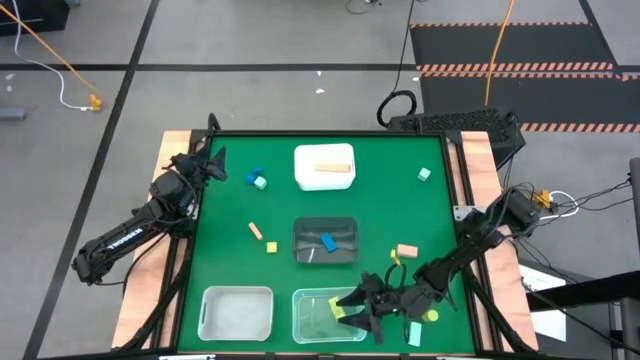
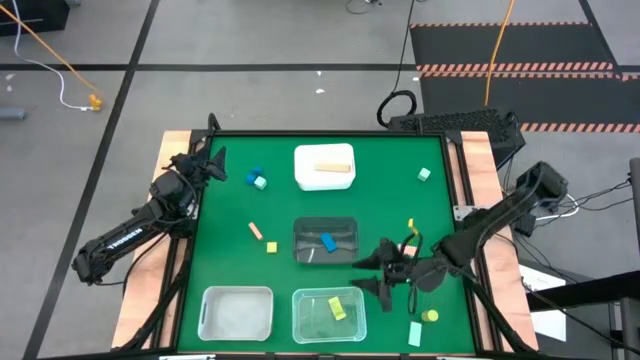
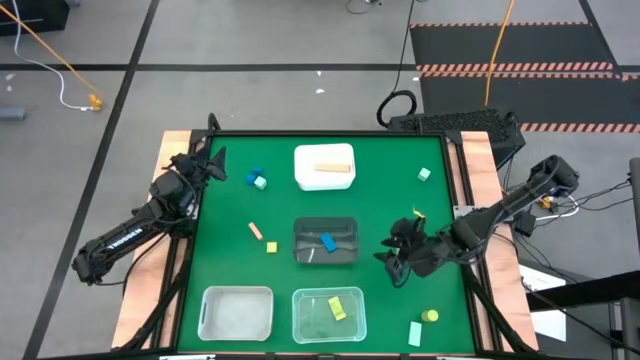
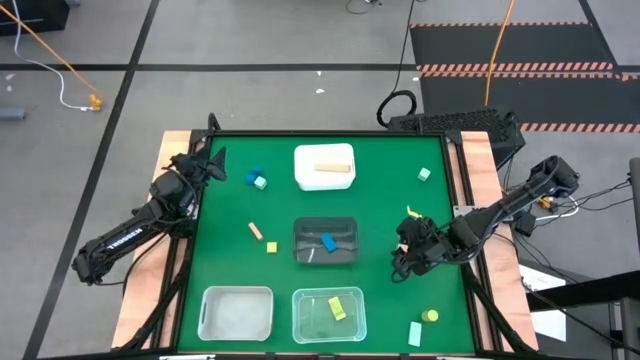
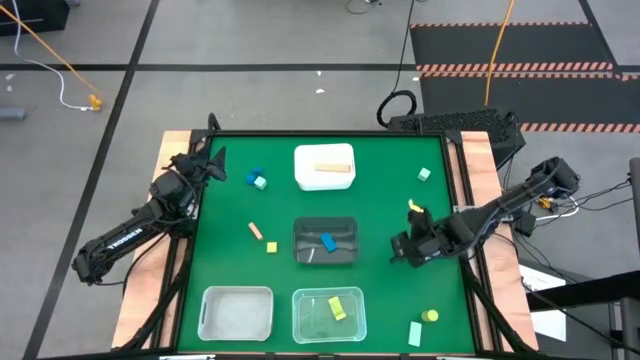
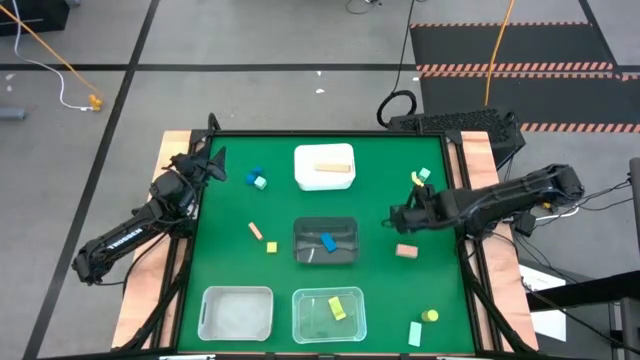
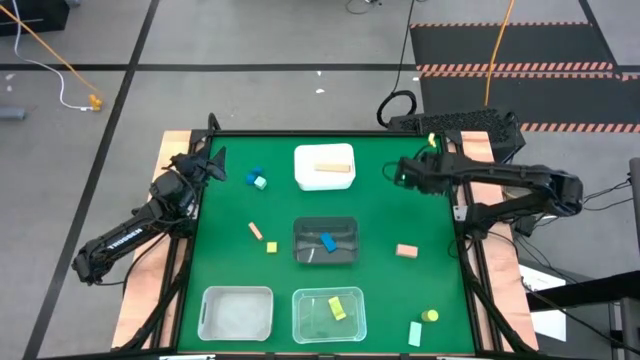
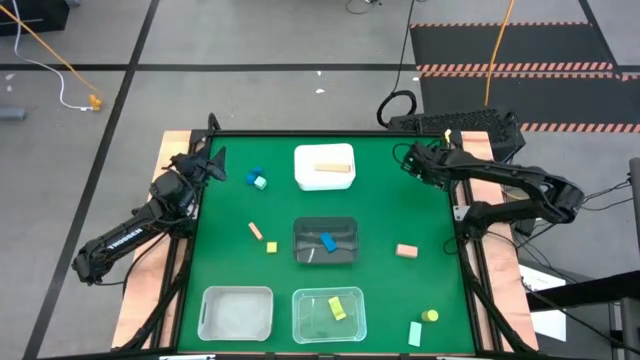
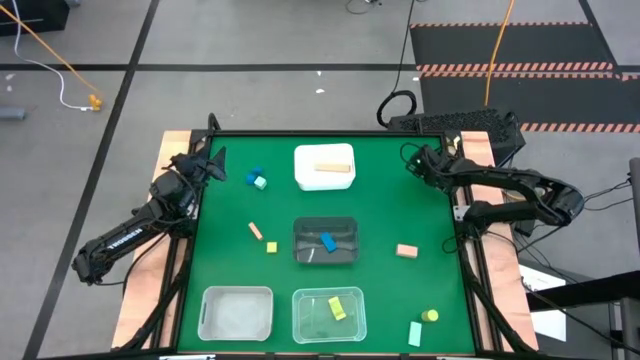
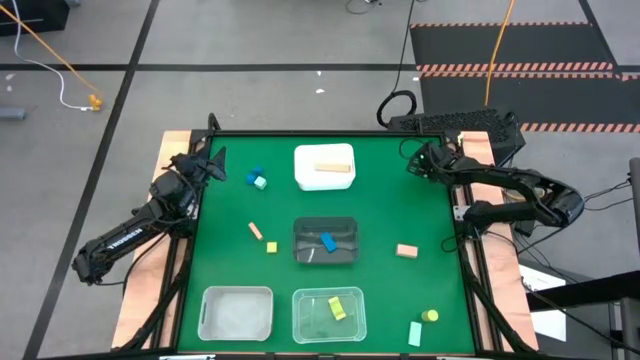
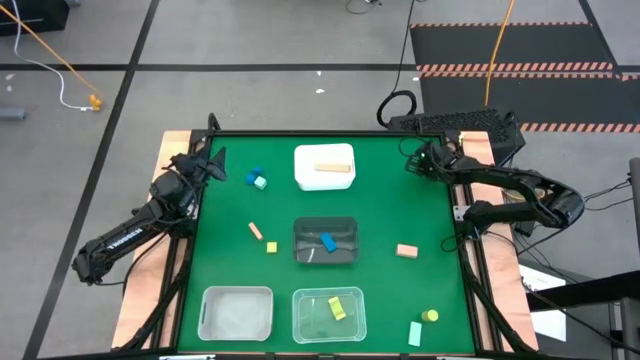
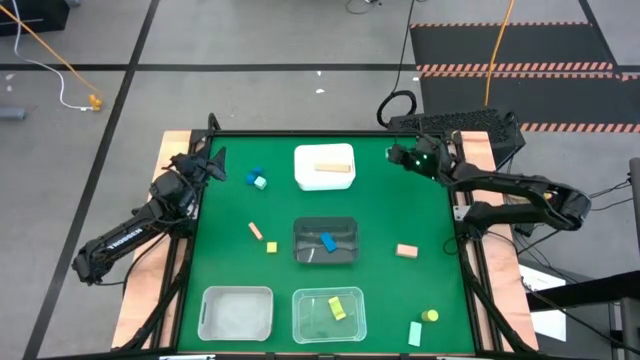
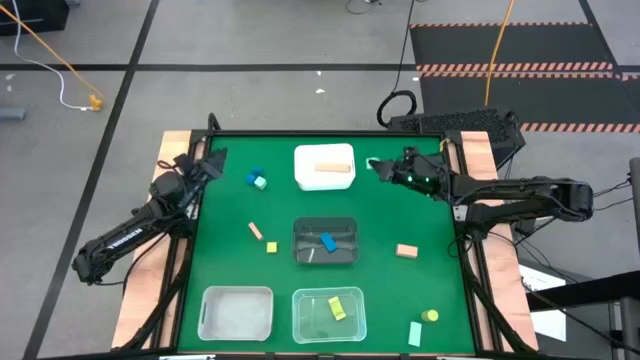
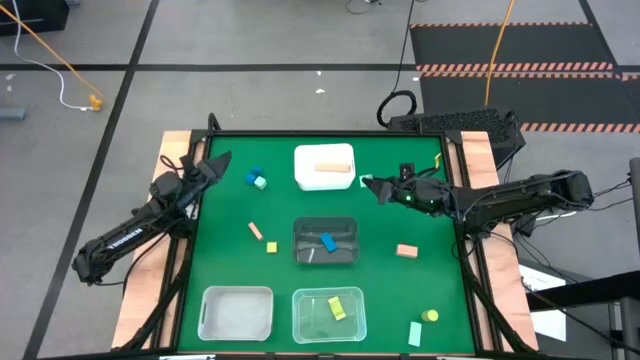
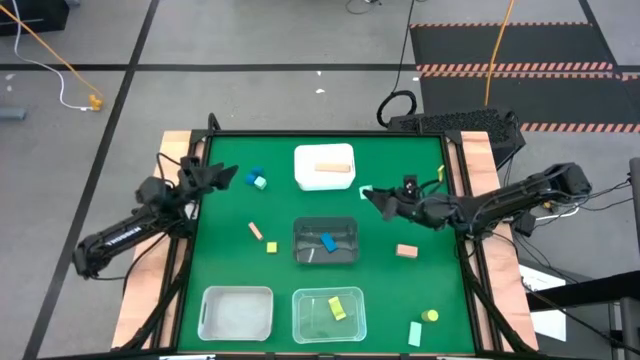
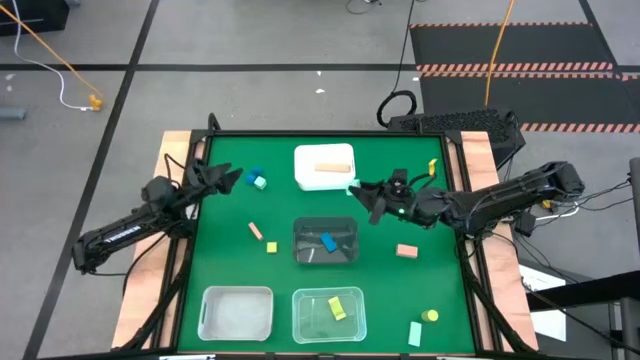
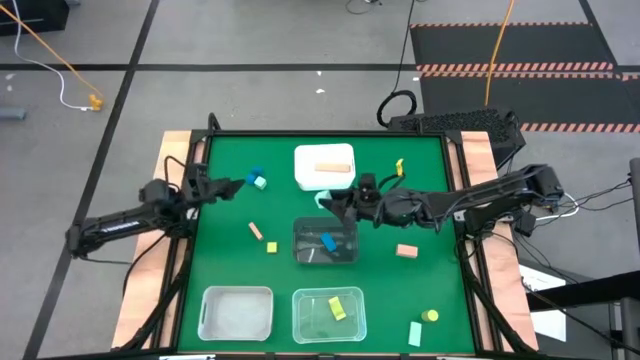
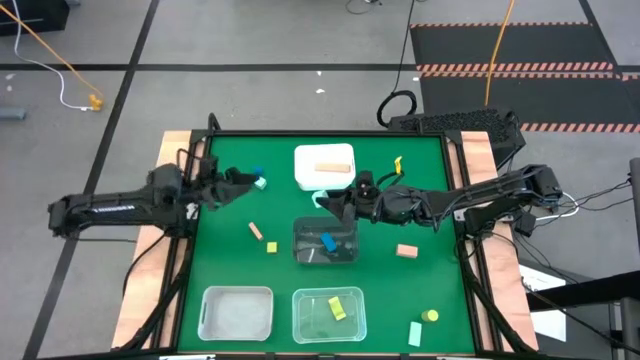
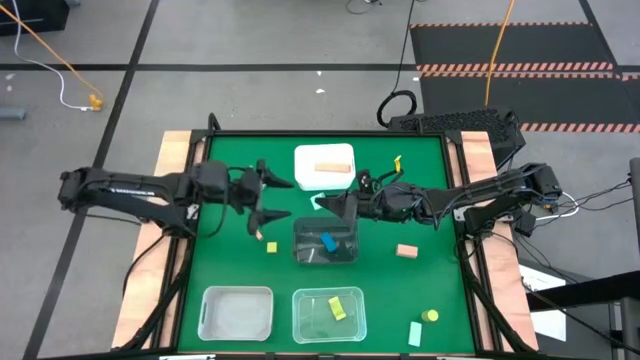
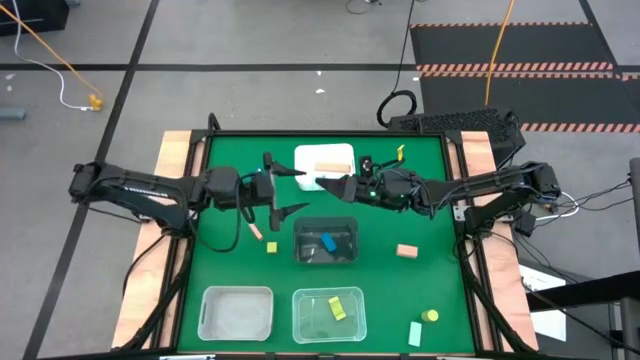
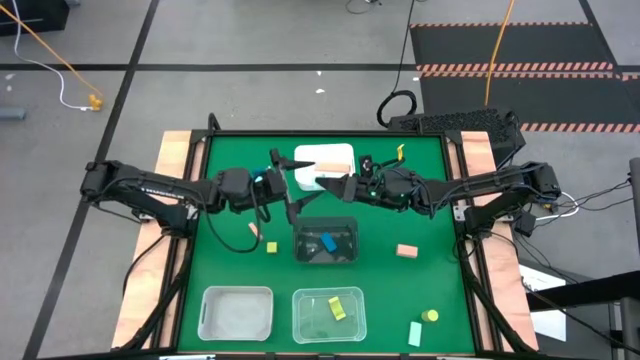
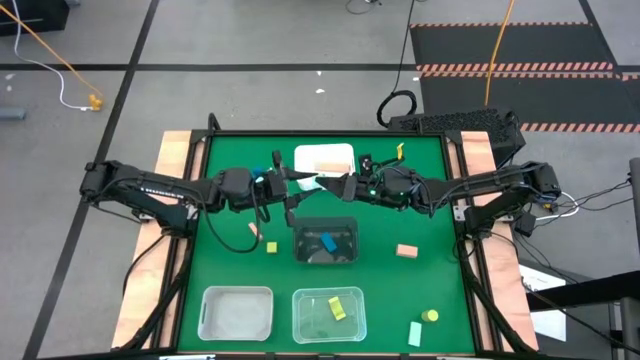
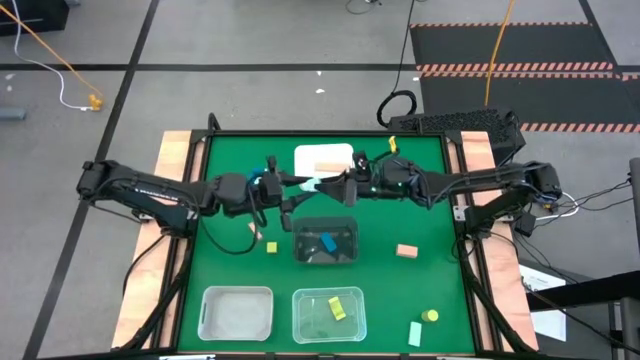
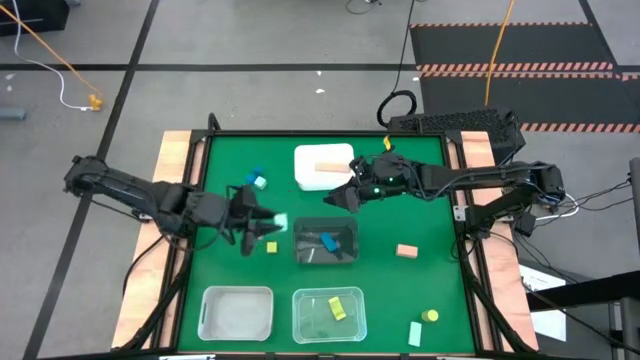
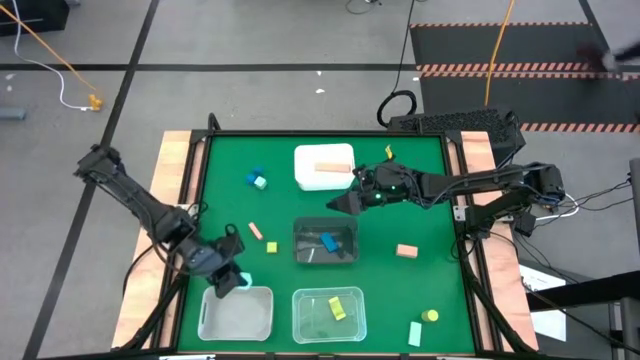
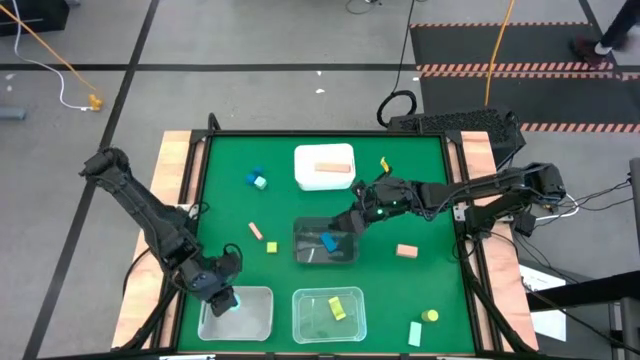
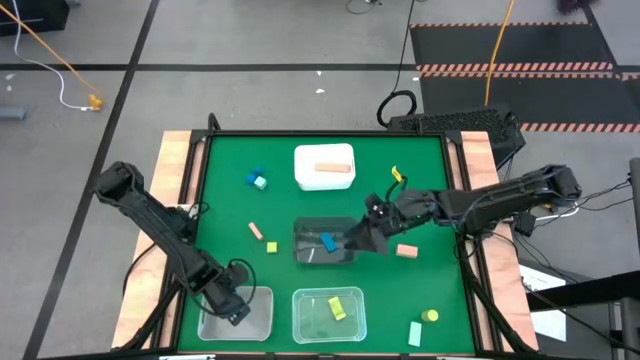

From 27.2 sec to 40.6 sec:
Task: Sort & place blocks by color
Put the top right light blue block into the gray bin

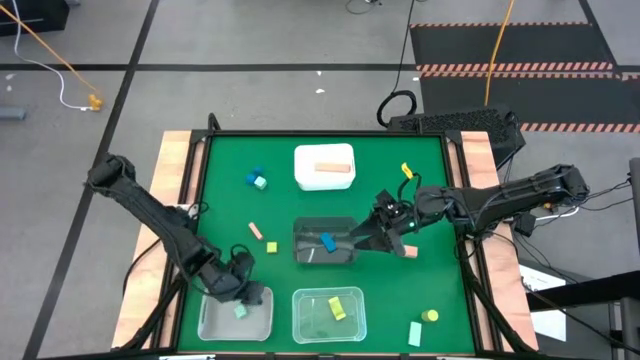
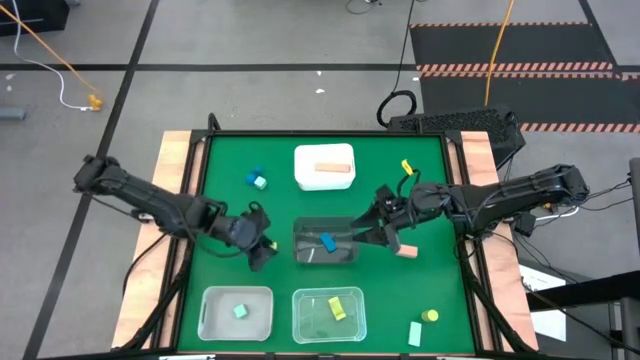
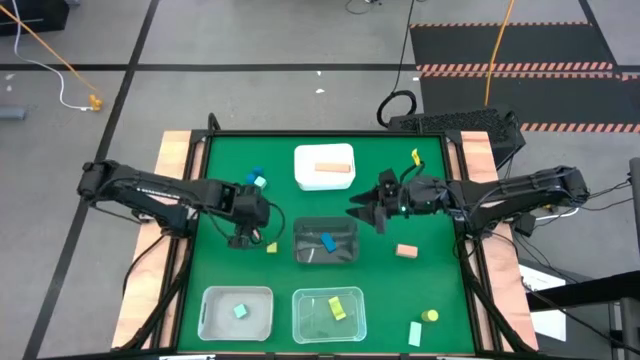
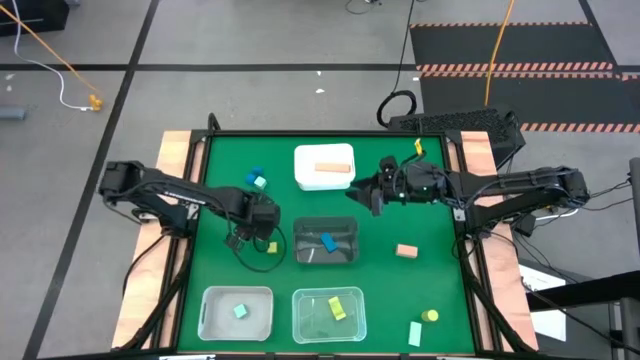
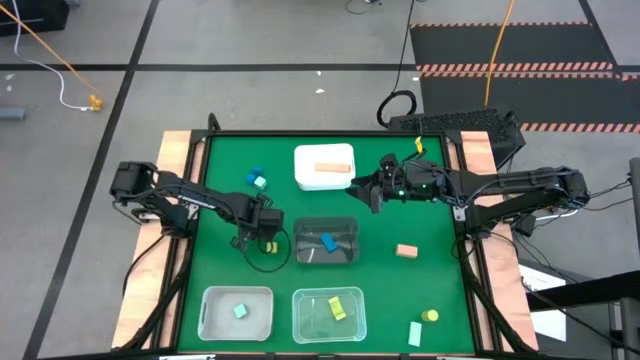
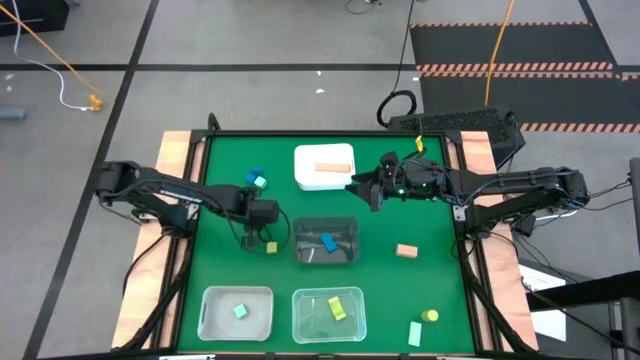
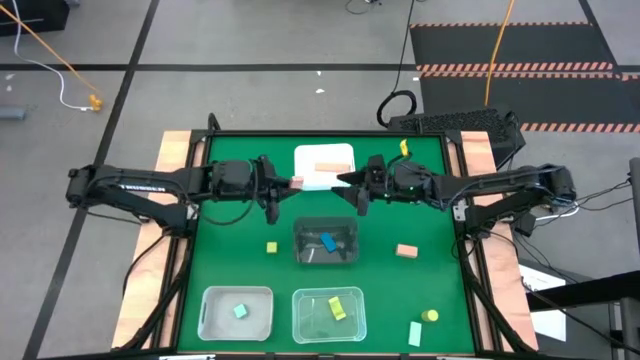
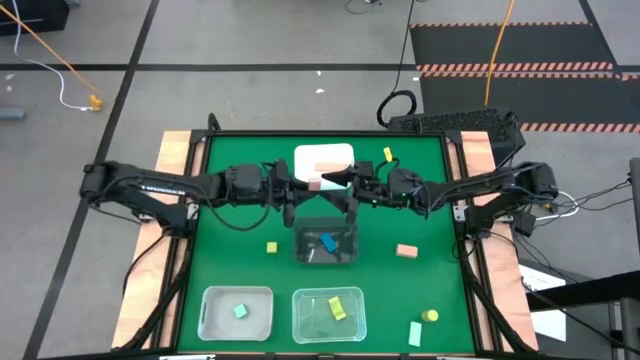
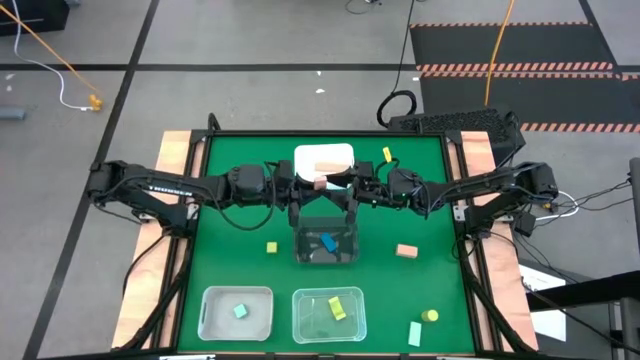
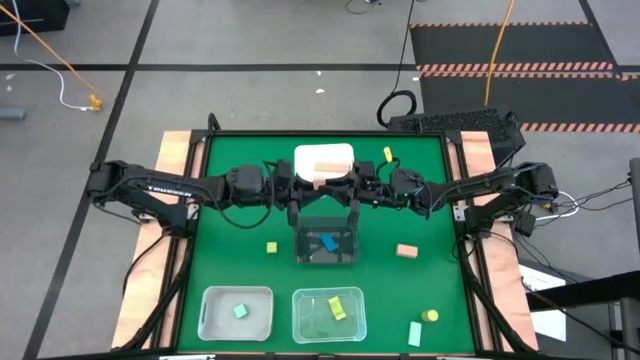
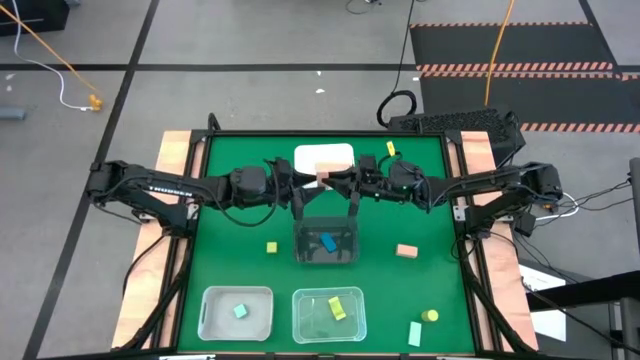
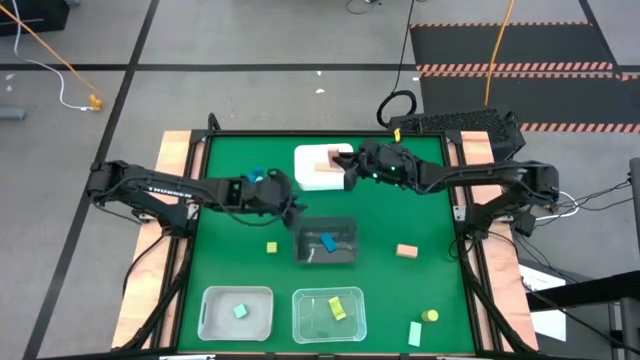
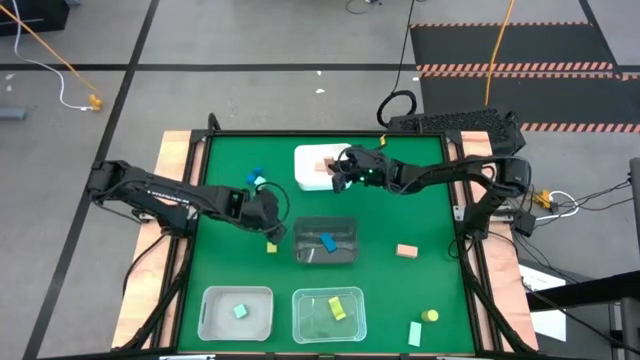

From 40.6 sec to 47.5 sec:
Put the left brown block into the white bin

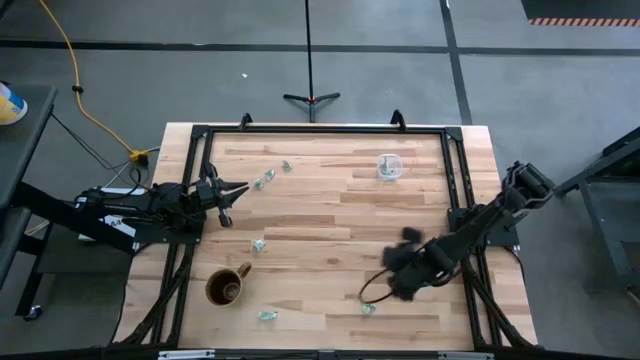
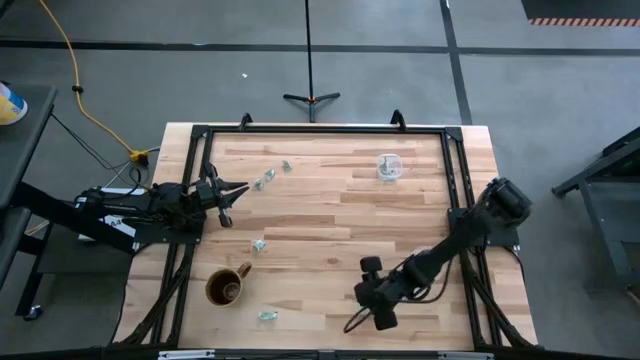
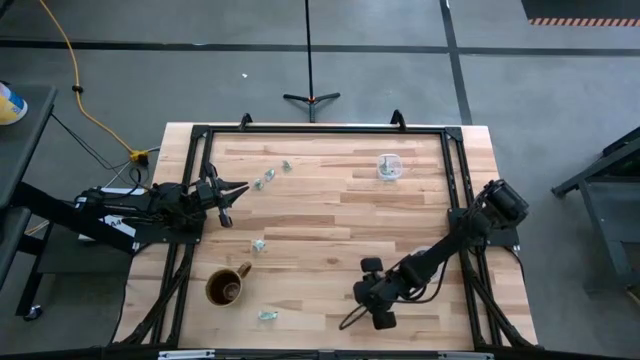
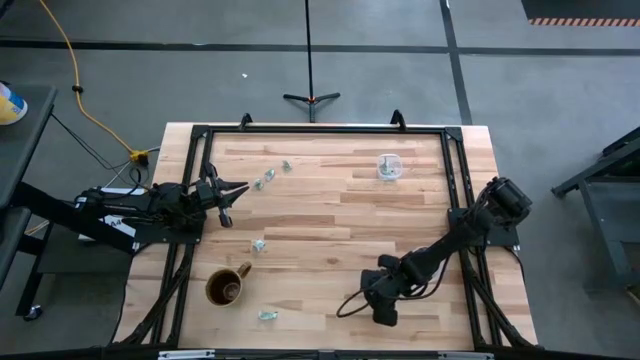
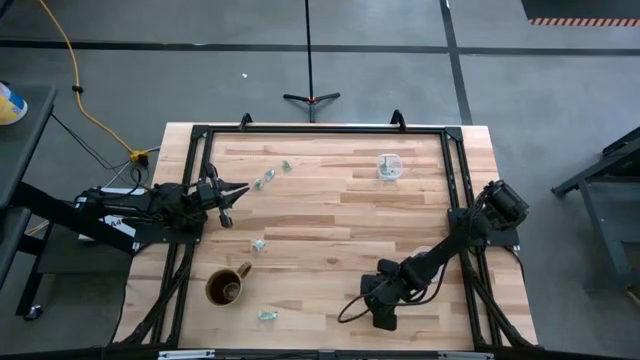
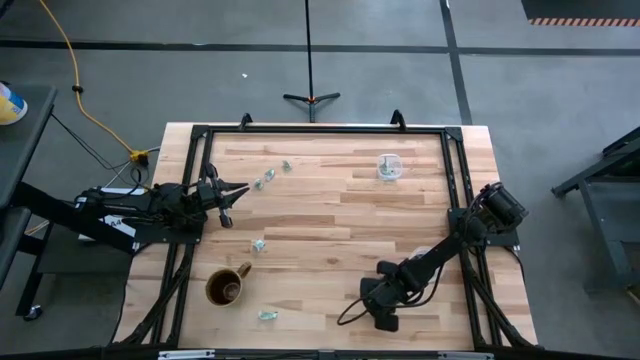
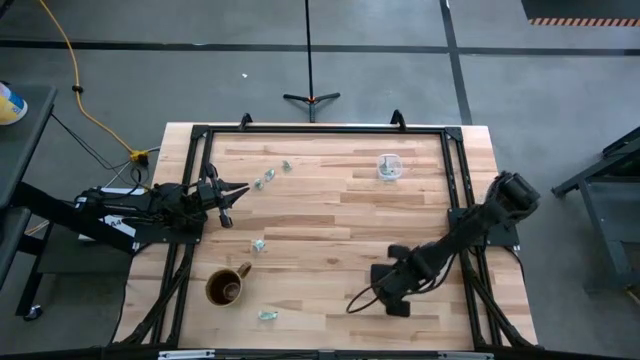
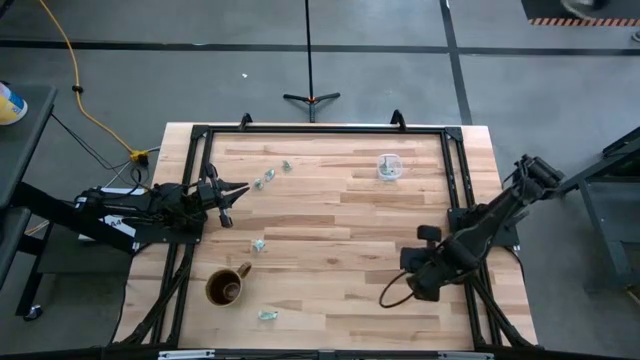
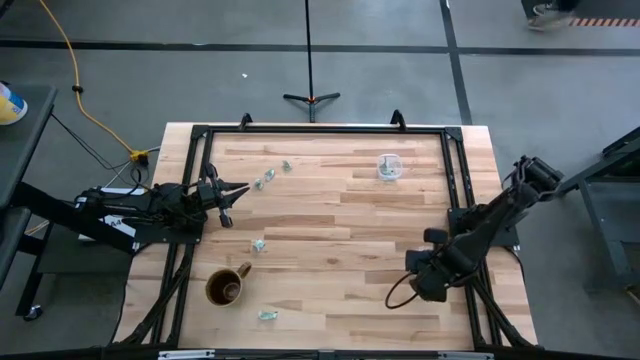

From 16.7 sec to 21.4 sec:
Task: Pick and place items into bin
Put the green stevia packet into the bottom transparent bin
